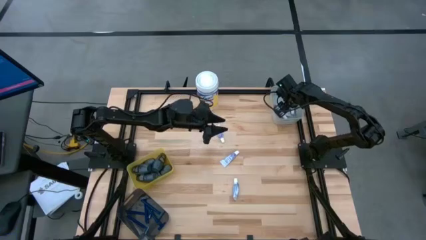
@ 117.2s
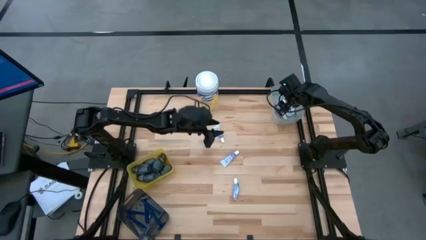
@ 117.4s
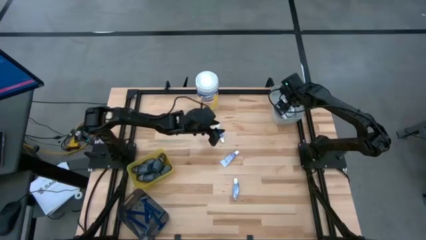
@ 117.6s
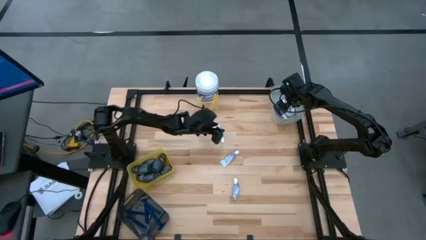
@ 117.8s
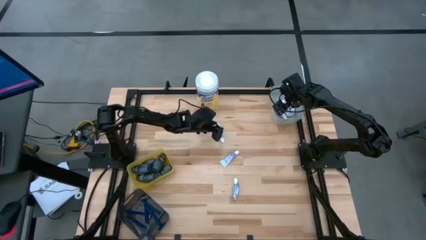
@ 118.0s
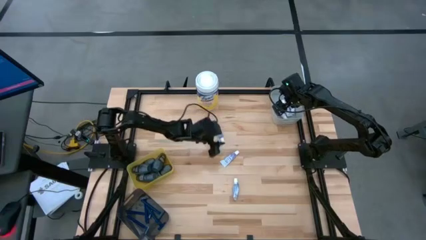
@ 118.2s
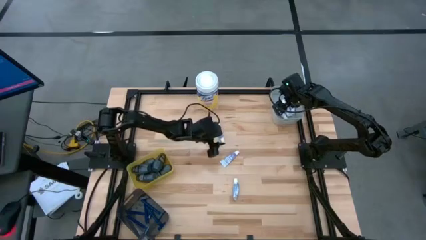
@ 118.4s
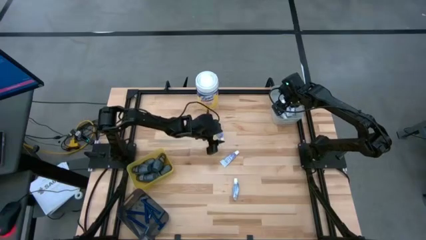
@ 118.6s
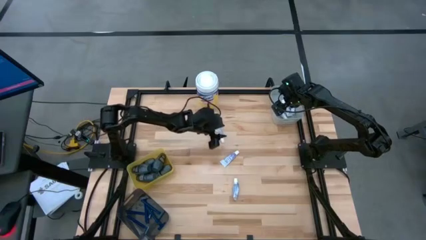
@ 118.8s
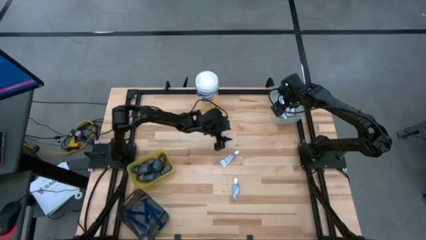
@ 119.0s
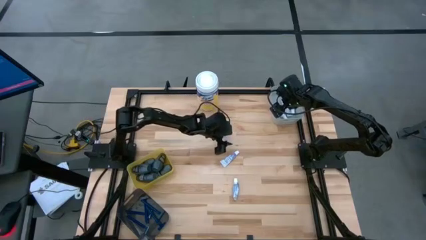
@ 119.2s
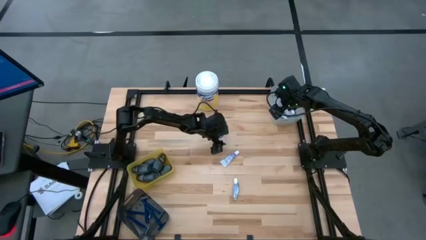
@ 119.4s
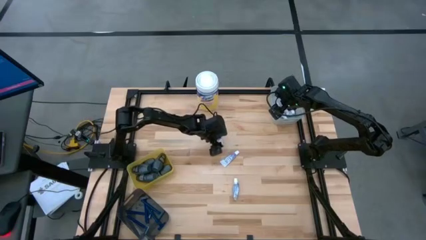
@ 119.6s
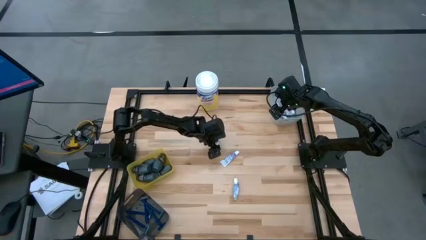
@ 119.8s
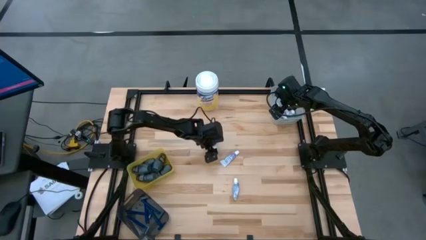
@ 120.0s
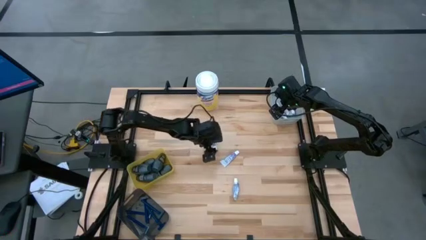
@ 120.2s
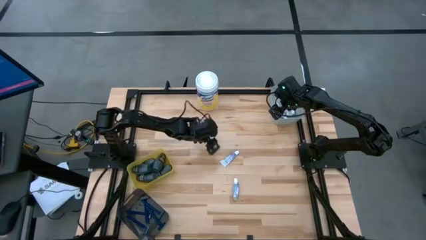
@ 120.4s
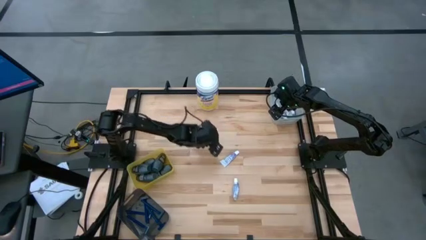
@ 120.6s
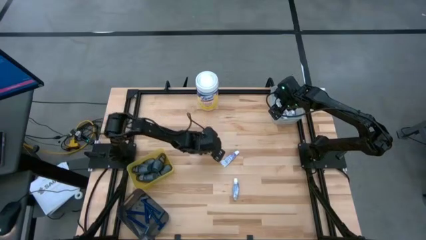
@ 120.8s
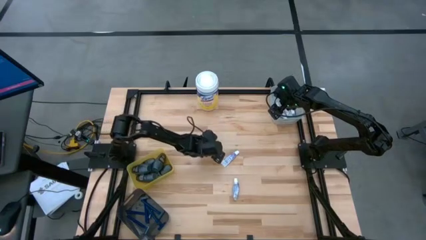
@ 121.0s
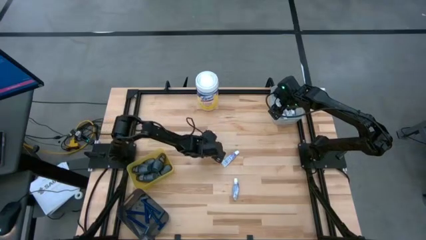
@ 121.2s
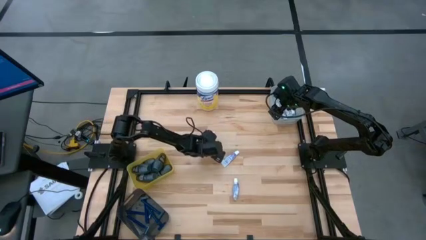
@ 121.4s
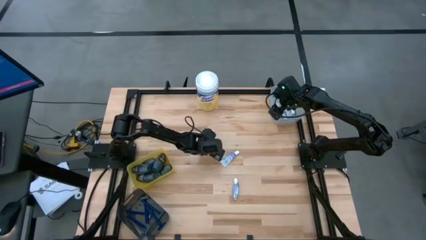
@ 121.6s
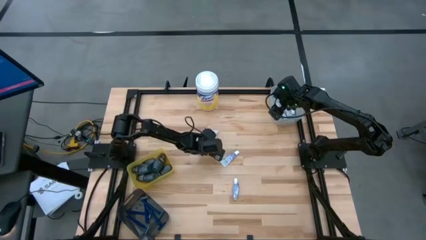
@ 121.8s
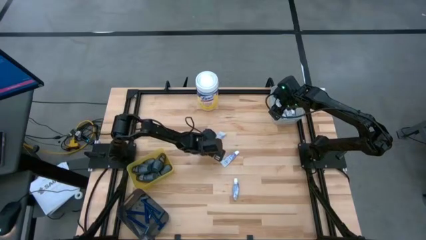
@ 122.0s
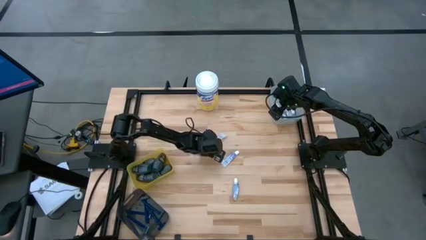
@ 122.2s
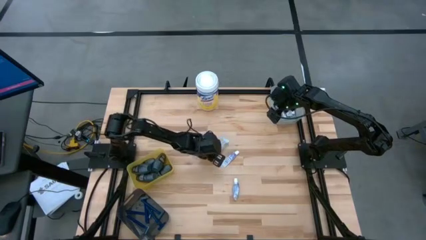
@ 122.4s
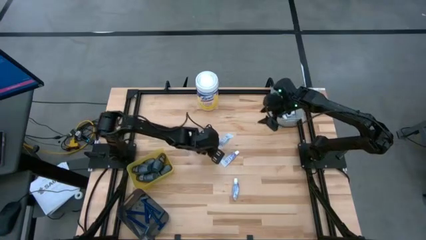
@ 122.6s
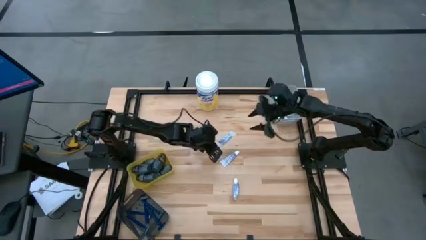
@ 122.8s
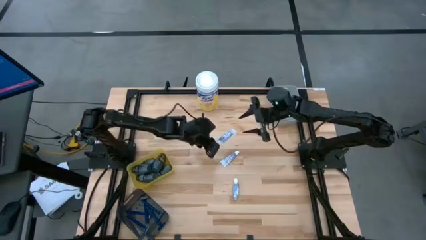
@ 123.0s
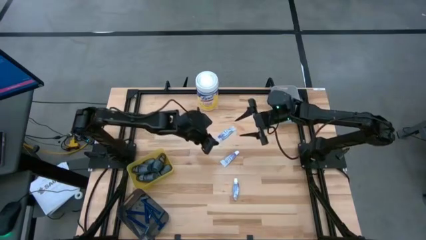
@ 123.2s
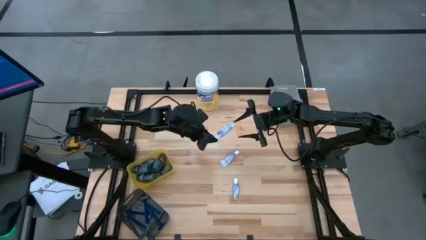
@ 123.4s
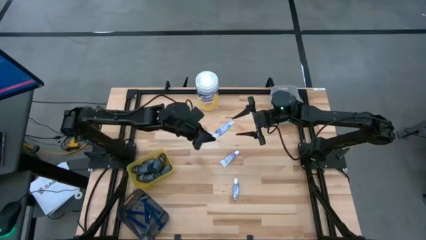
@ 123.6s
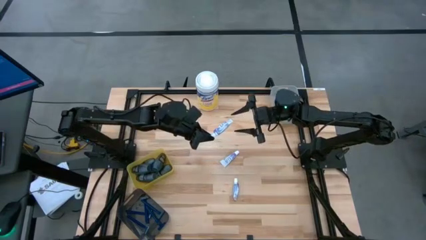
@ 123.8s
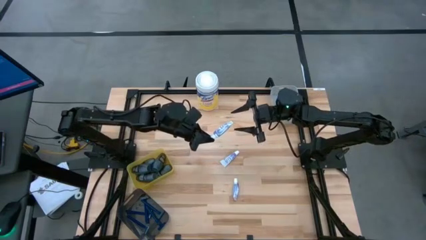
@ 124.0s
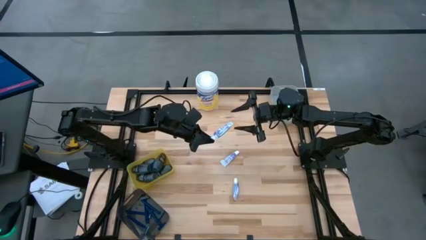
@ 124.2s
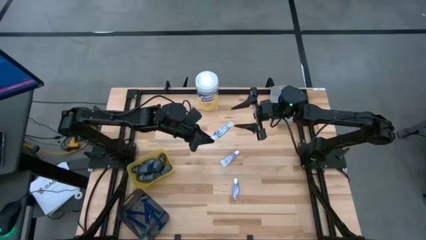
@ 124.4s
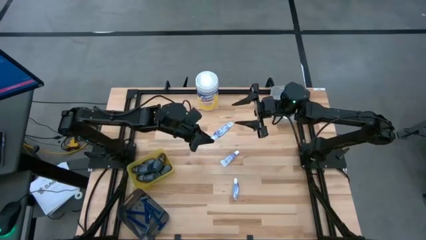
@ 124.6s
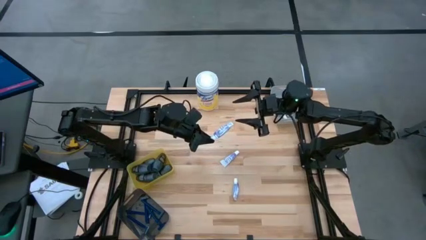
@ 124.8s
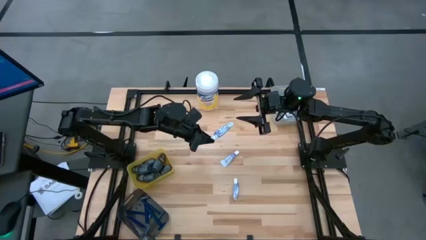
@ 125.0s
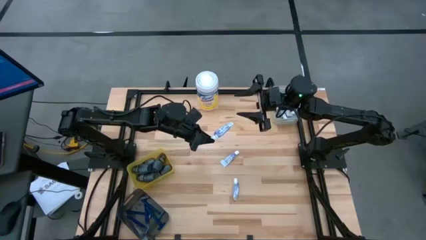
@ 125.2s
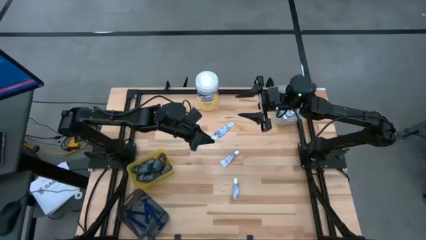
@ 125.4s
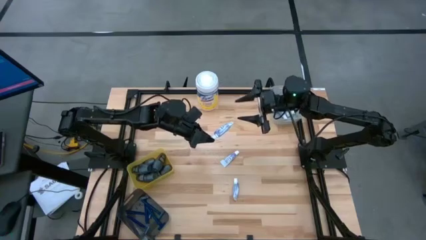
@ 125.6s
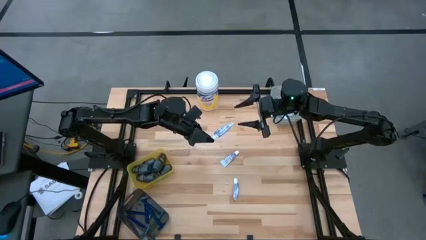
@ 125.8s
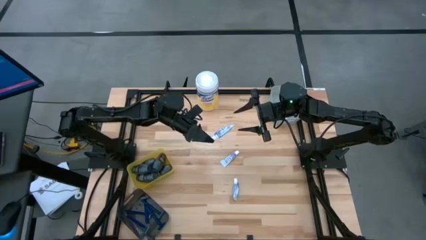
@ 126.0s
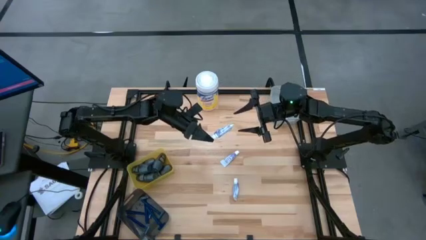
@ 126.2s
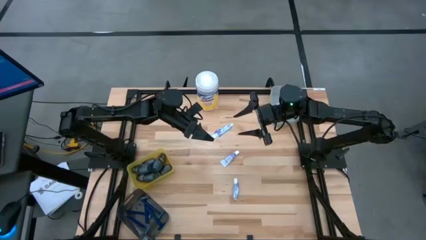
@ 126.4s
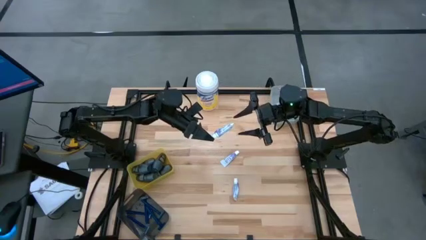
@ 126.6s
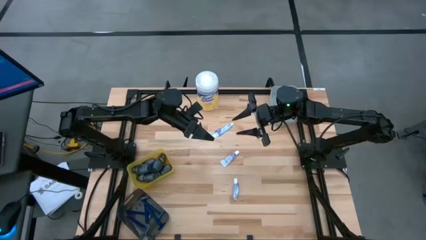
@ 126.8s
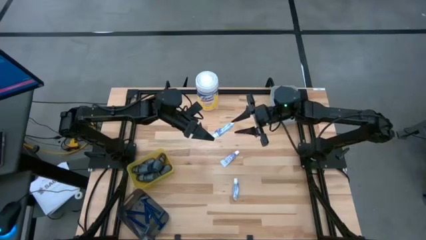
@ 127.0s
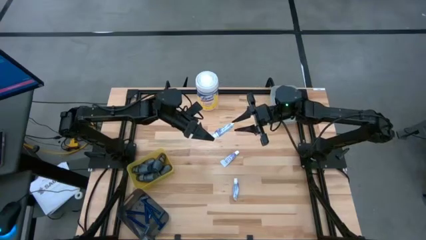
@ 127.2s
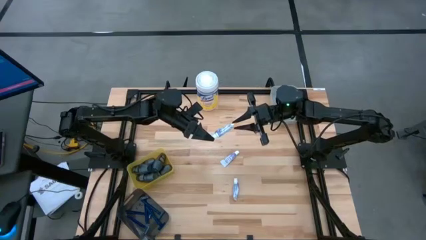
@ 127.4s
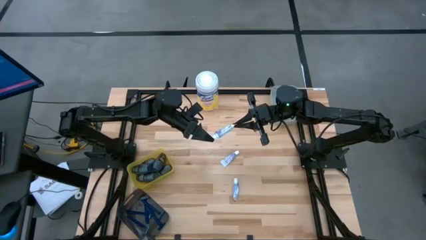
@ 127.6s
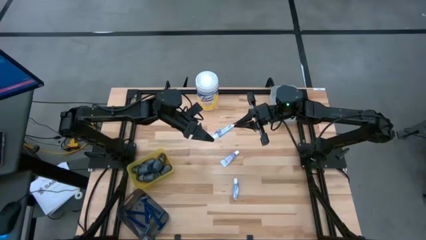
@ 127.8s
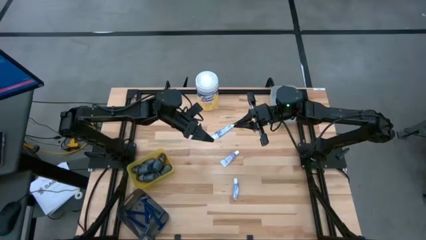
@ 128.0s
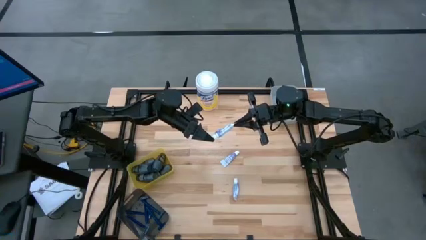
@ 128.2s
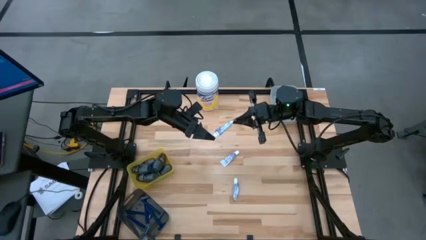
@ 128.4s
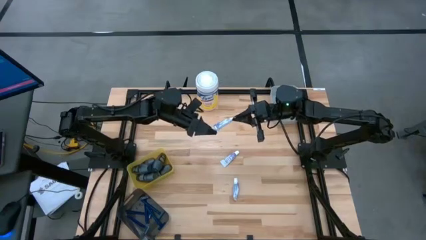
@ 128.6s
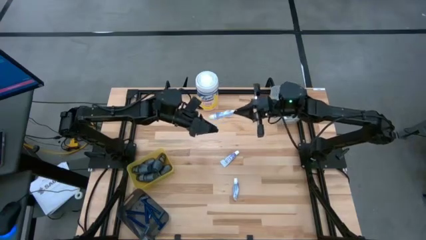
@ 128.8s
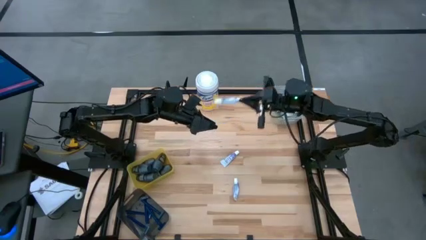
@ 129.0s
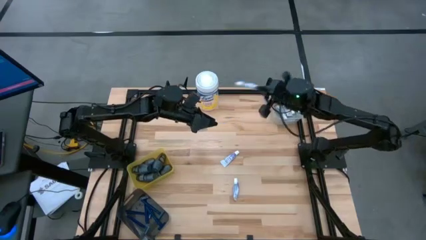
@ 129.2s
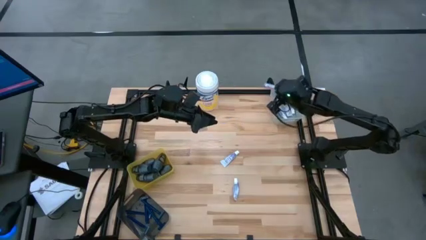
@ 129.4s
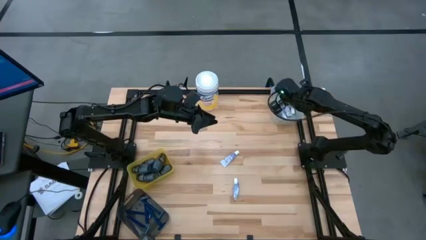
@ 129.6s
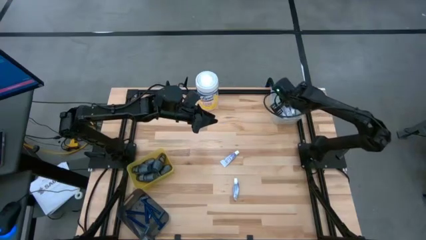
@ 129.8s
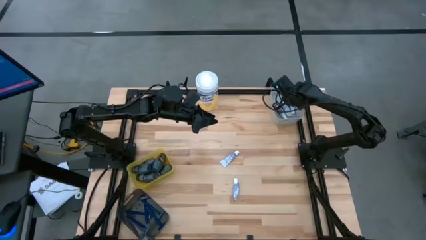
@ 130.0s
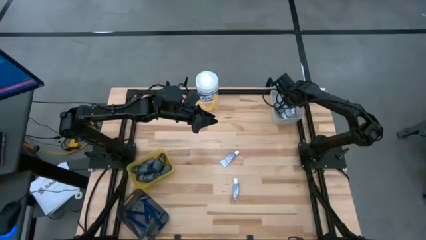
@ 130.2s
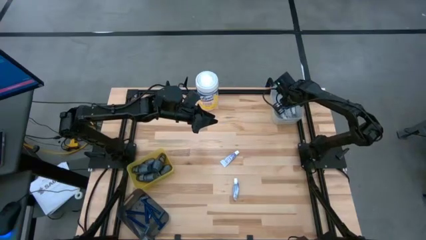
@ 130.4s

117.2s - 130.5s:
Task: Pick & Place Travel size toiletries
Put the white toothpaste into the gray bin

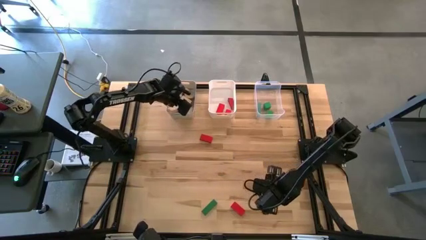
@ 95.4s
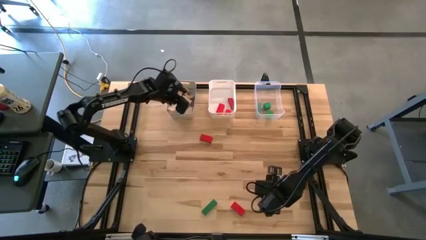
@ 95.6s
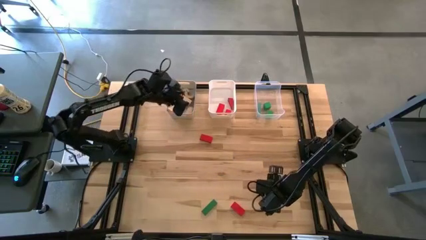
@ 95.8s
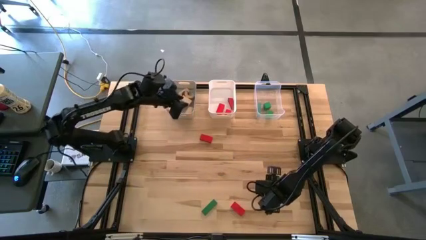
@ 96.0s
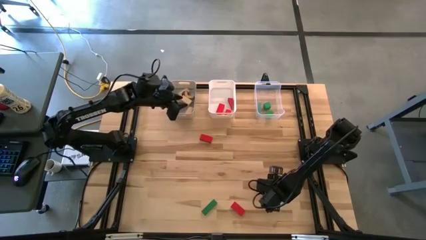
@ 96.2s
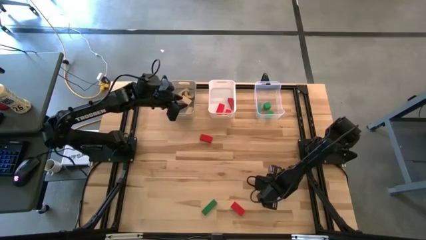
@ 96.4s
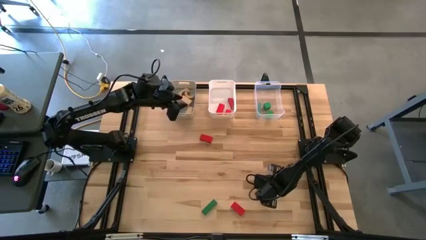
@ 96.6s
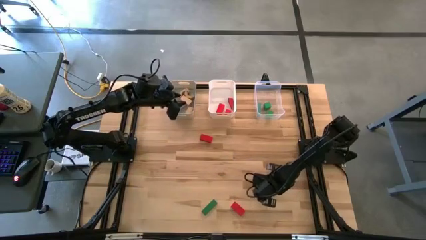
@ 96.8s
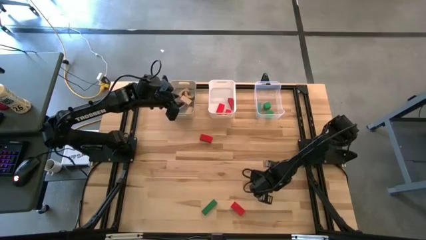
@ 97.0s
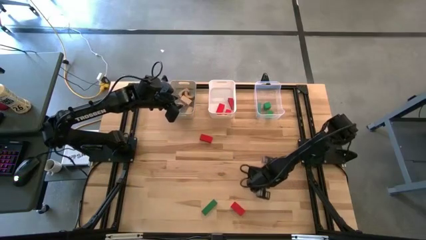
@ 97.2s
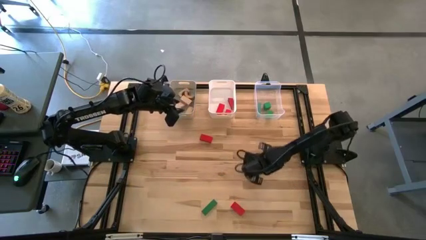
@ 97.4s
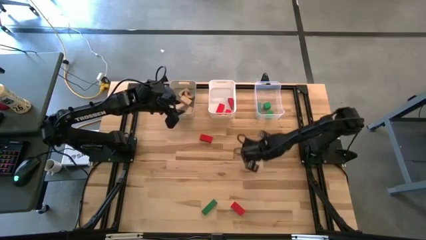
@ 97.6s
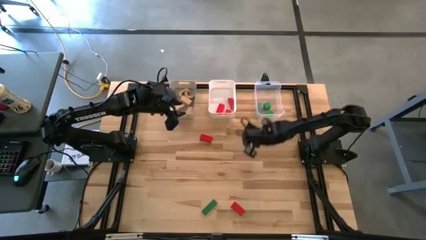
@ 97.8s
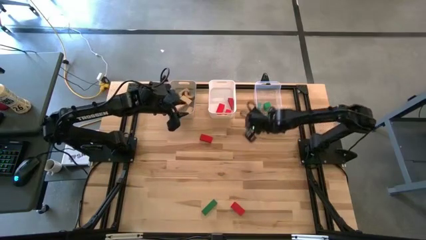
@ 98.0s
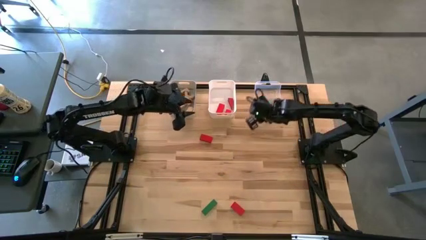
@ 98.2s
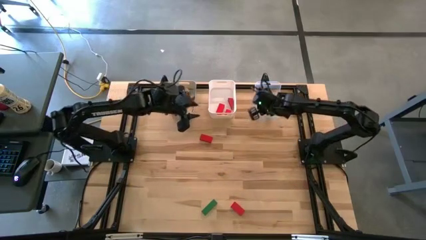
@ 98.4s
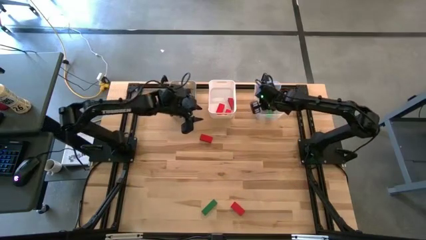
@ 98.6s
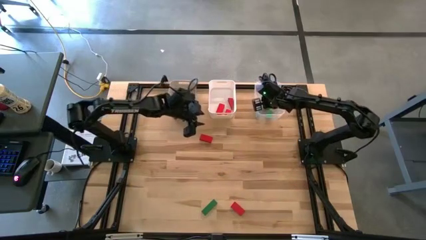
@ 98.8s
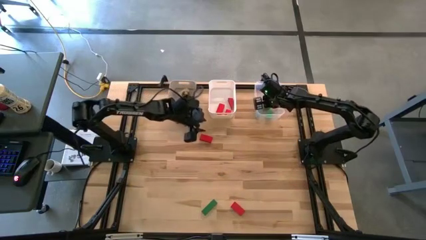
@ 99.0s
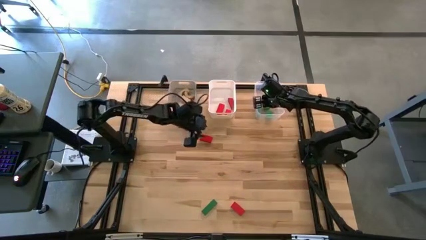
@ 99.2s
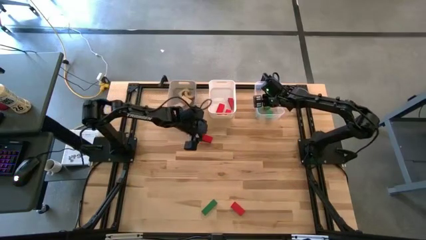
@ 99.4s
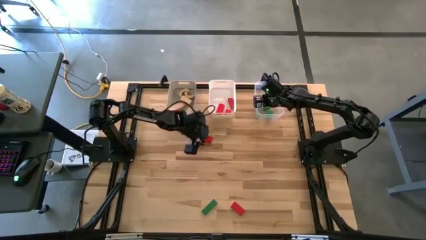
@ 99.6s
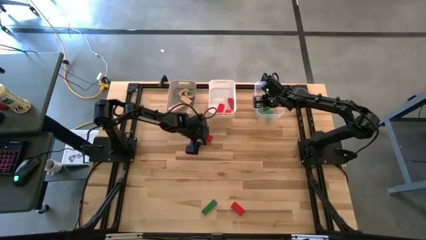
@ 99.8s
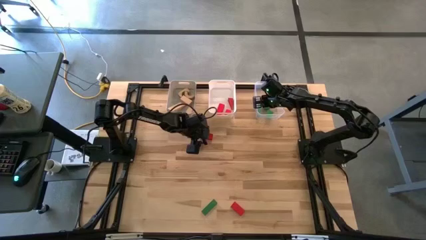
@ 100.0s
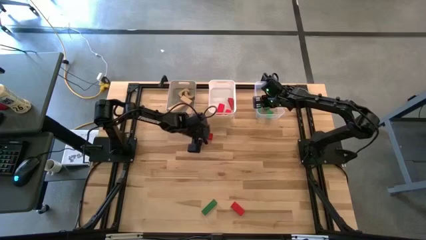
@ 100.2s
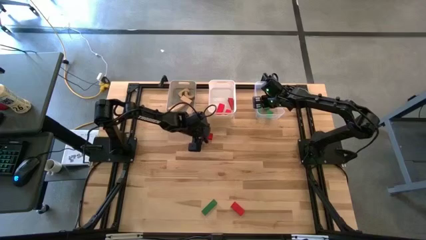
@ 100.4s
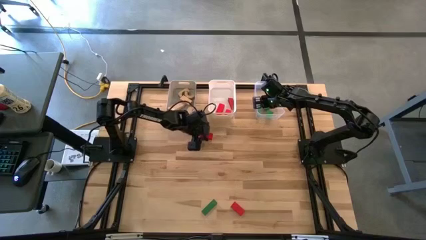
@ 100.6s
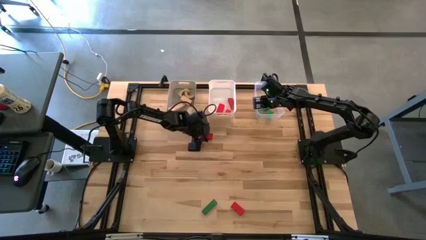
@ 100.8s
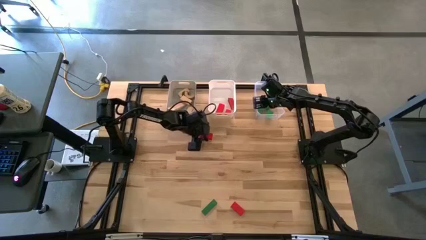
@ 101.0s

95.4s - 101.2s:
Task: Sort & place blocks by color
Put the right green block into the transparent bin
